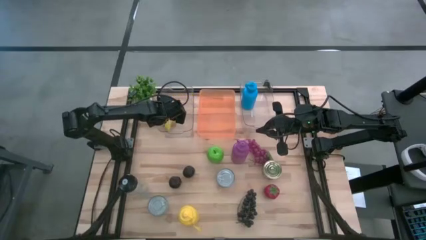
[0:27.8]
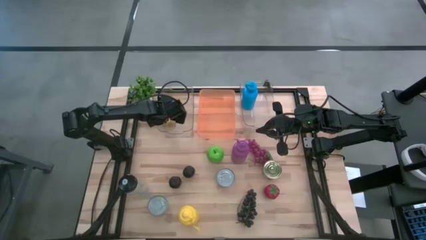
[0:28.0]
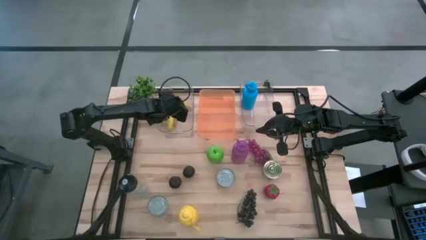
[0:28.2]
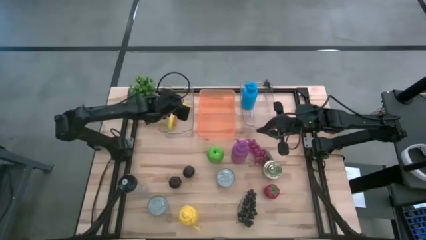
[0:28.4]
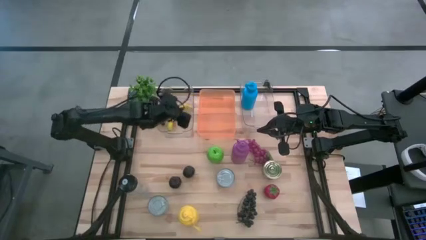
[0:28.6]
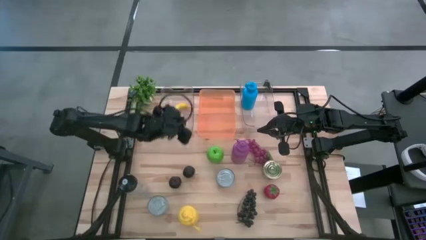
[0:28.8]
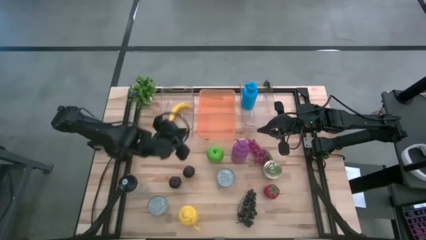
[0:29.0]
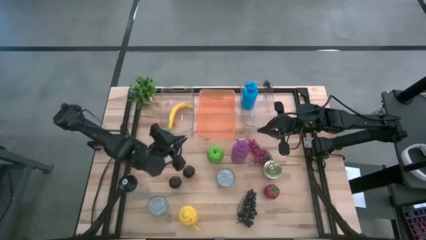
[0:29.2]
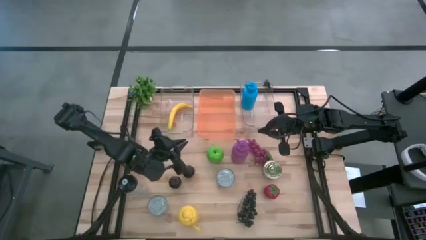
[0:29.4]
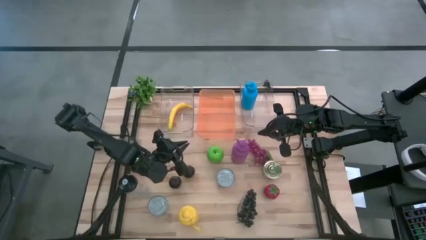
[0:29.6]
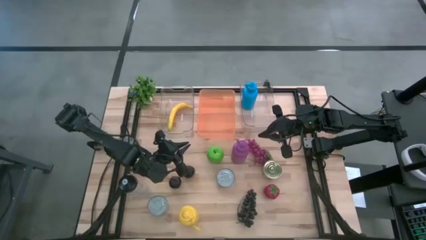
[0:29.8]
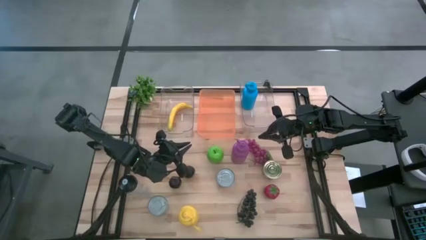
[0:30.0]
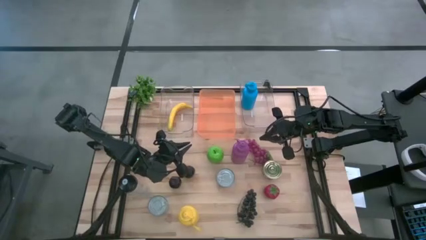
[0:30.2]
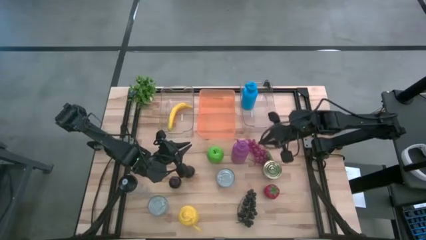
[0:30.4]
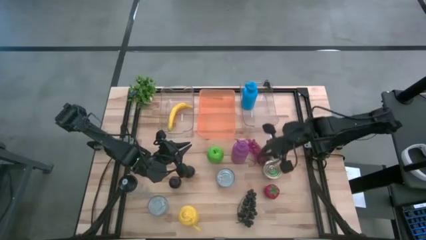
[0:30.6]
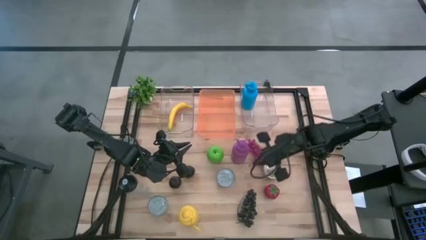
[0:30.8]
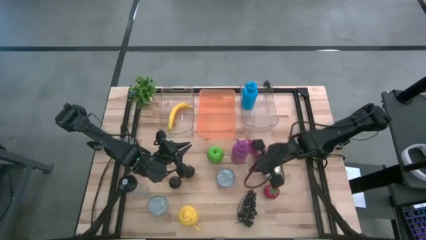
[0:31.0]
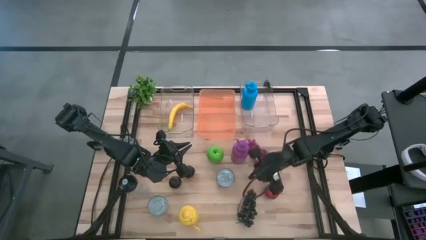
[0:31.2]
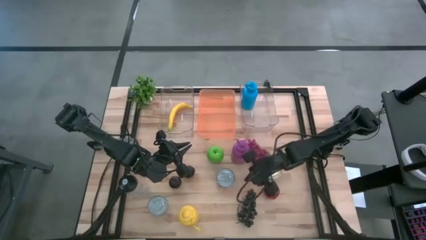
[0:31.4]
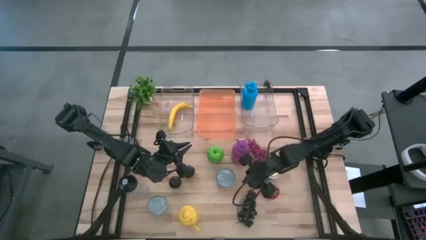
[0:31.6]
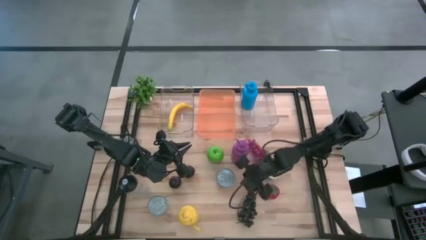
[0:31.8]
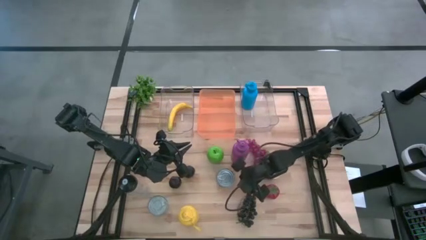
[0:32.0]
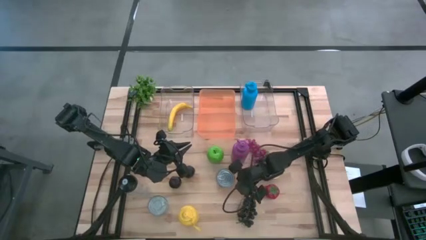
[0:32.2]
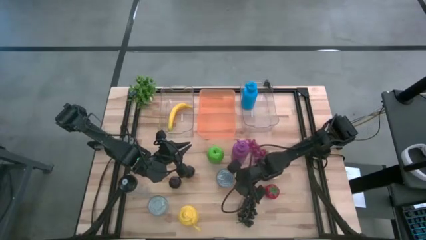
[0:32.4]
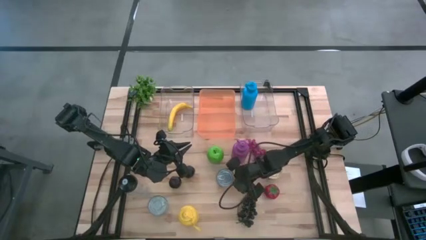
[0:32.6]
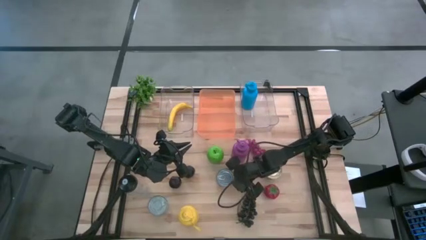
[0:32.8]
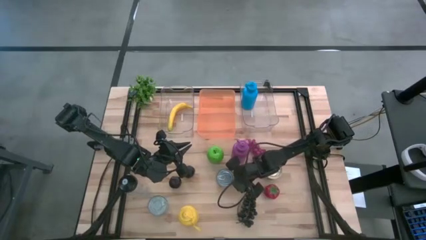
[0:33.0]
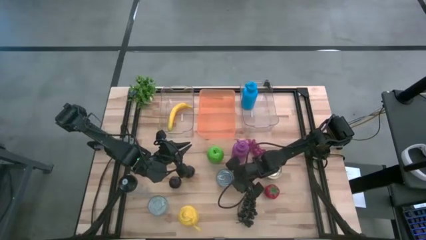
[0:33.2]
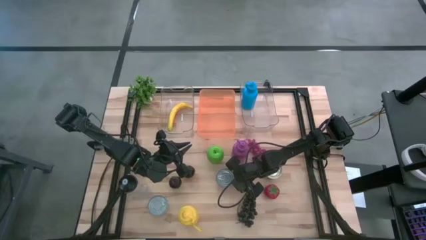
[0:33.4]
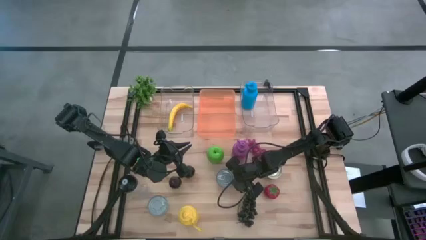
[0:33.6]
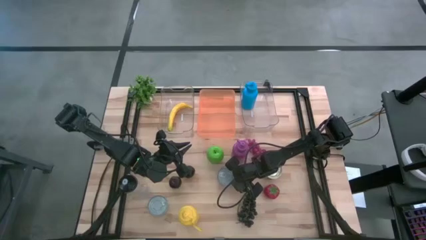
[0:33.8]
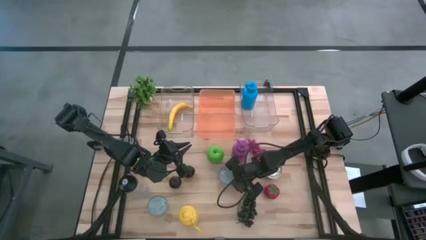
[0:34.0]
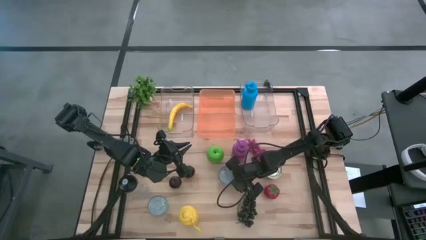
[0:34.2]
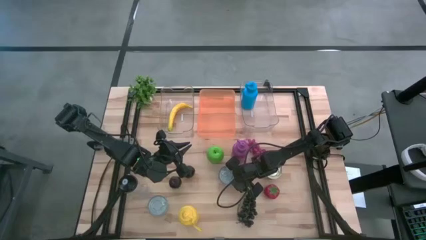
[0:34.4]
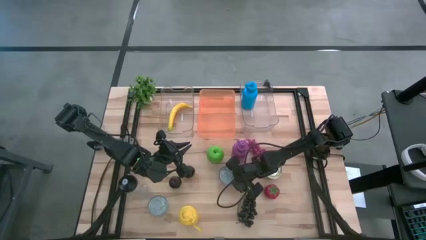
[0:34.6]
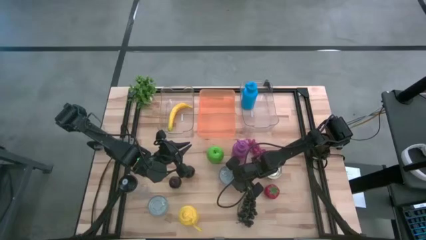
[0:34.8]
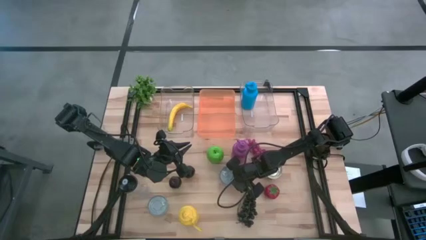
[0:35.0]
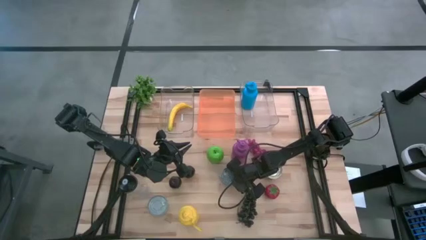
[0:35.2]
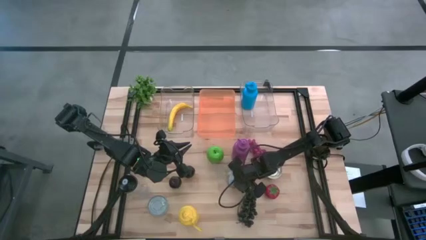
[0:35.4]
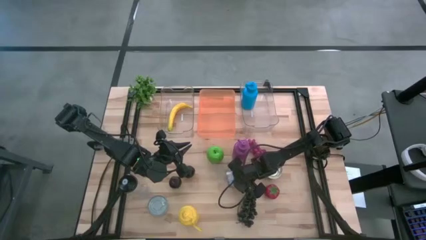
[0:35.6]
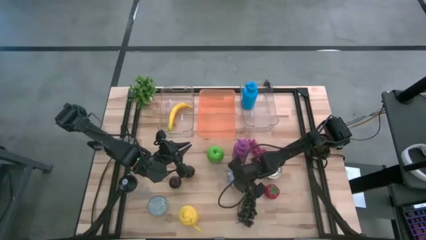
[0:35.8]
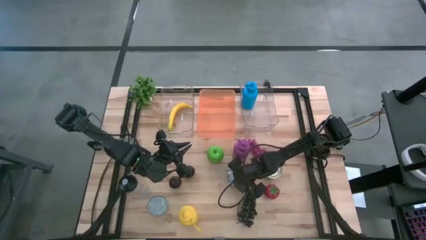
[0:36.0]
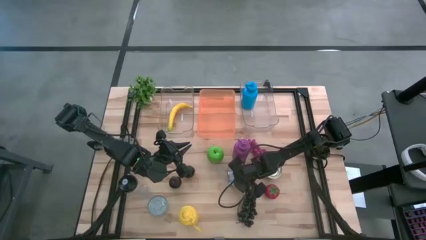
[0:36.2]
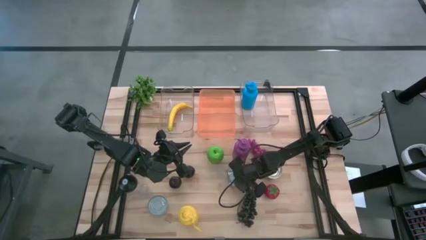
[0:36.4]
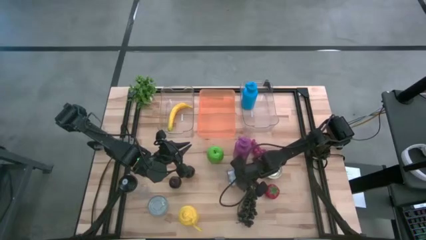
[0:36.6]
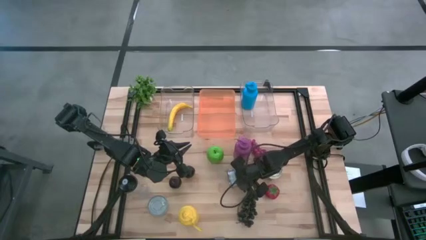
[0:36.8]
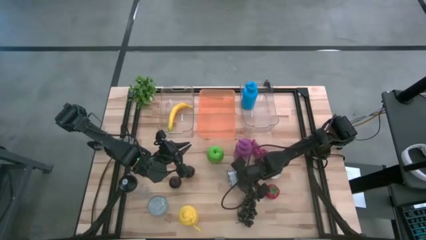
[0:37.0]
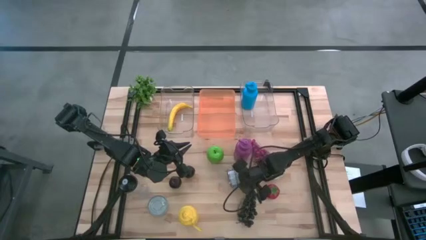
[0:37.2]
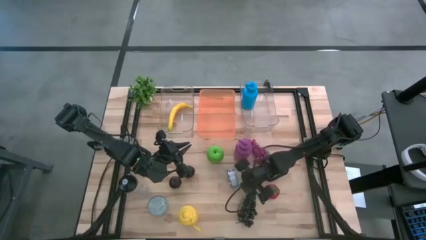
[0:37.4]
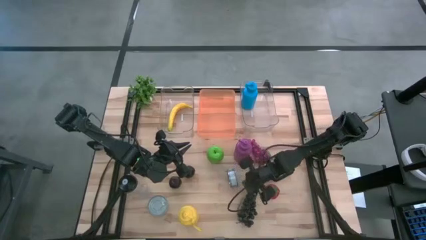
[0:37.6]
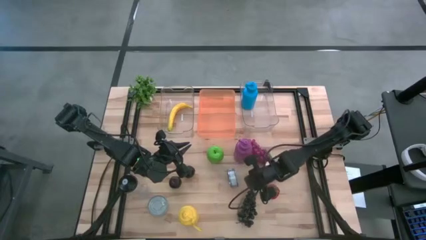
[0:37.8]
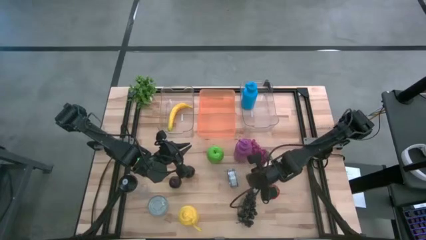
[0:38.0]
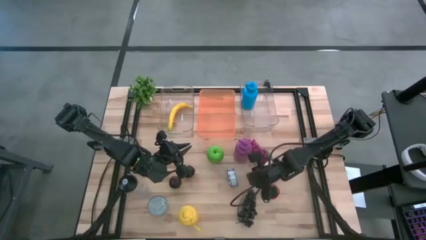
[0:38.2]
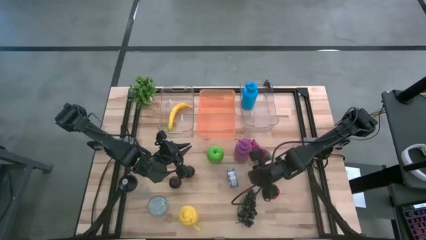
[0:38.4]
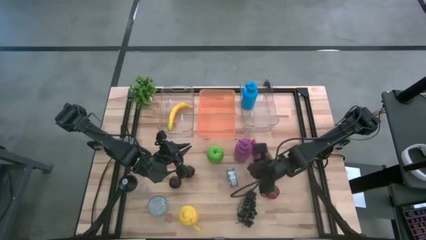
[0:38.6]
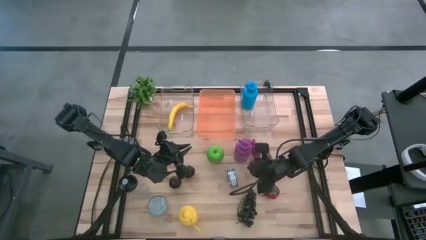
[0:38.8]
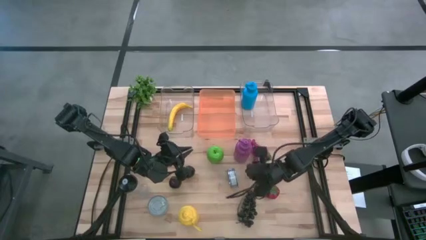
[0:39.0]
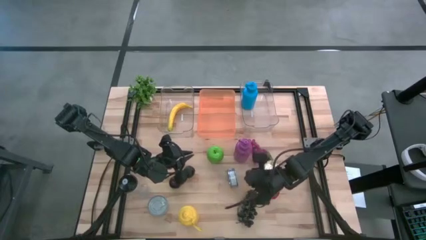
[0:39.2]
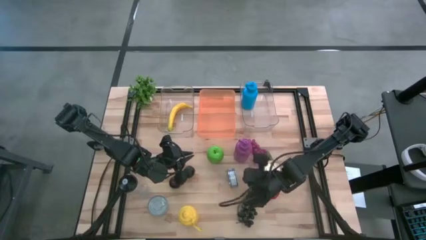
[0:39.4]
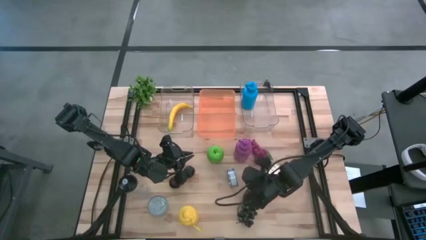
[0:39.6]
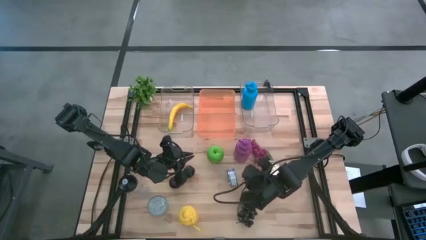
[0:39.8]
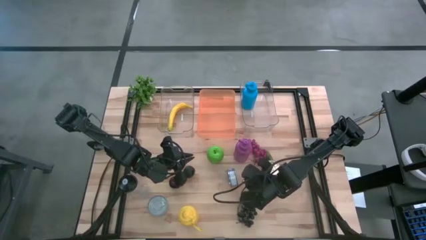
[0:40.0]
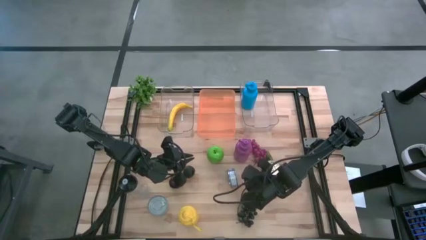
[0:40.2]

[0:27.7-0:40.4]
Task: Pick & Place Food Item
Put the blue tuna can into the orange bin

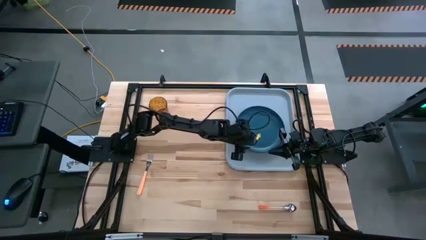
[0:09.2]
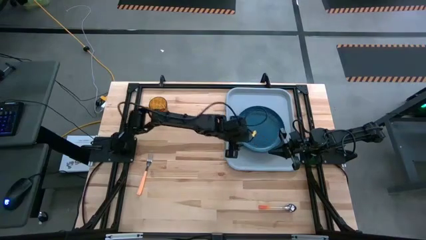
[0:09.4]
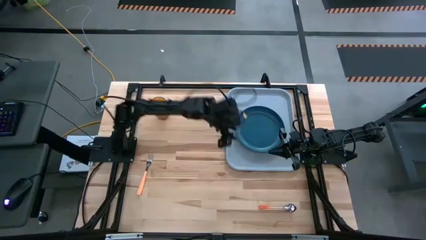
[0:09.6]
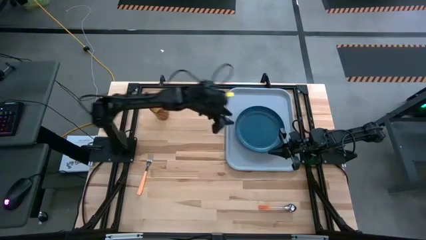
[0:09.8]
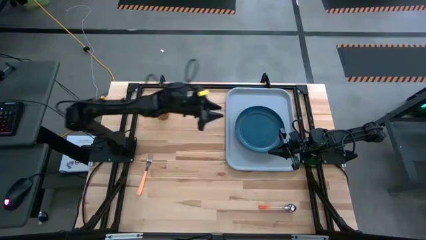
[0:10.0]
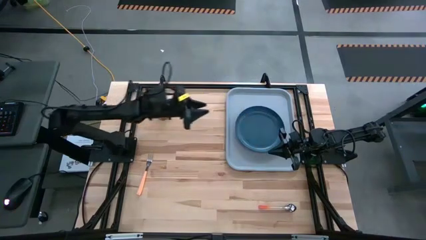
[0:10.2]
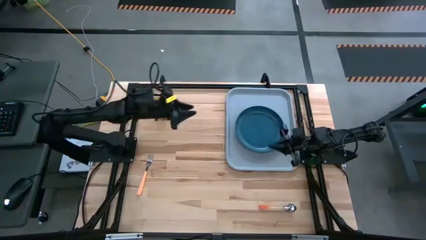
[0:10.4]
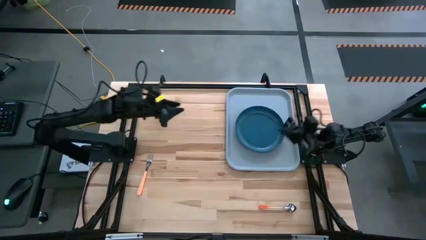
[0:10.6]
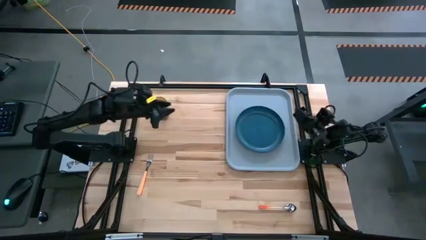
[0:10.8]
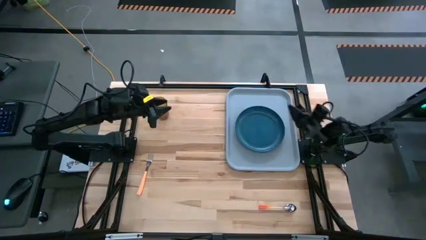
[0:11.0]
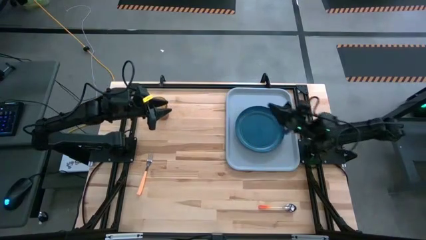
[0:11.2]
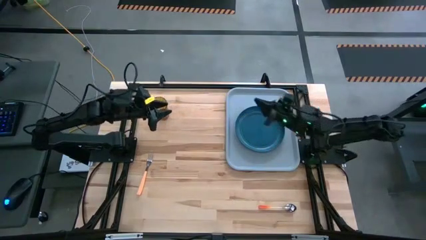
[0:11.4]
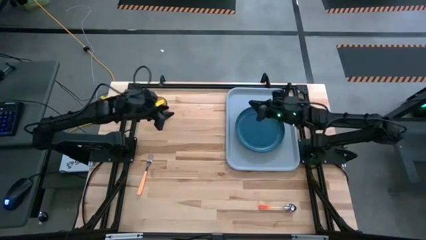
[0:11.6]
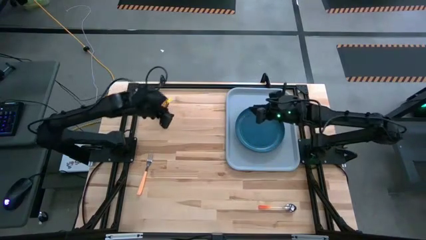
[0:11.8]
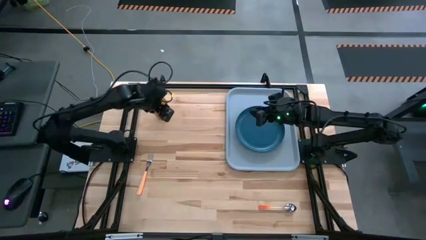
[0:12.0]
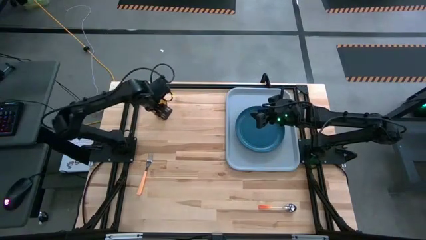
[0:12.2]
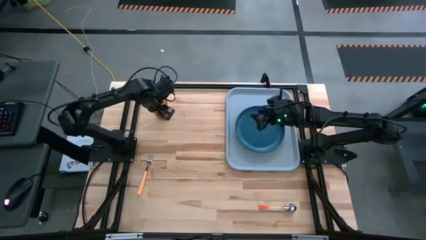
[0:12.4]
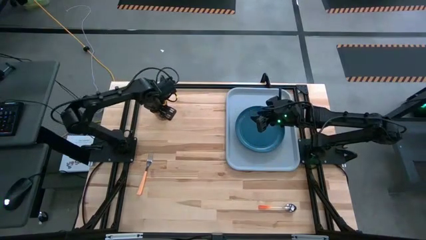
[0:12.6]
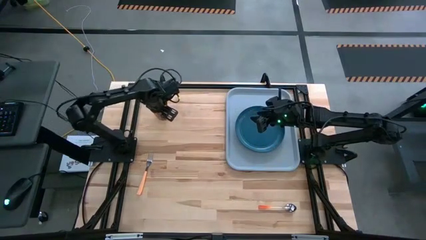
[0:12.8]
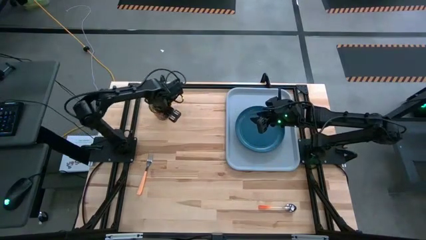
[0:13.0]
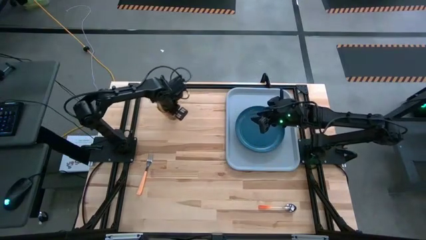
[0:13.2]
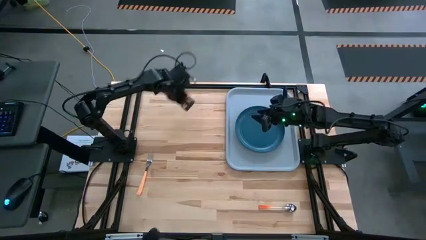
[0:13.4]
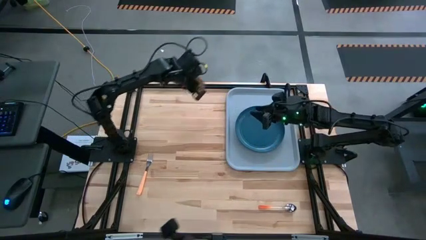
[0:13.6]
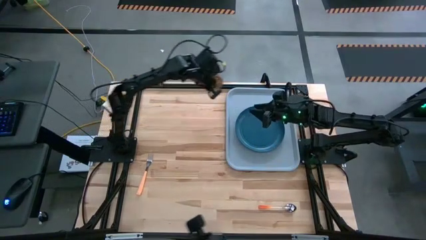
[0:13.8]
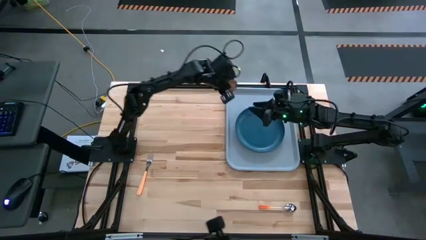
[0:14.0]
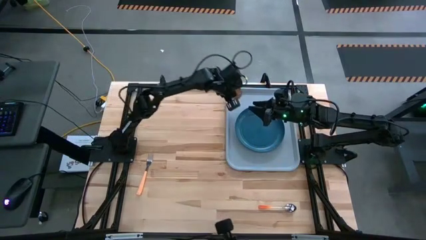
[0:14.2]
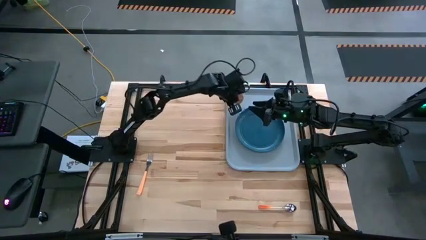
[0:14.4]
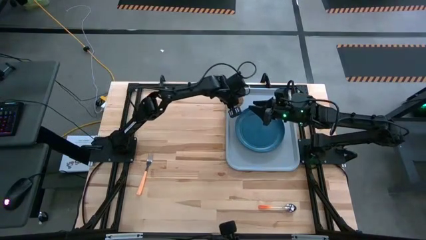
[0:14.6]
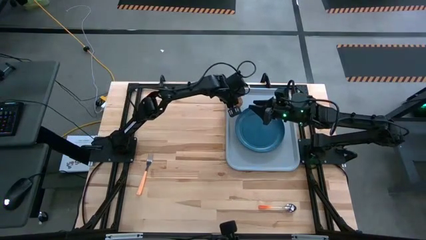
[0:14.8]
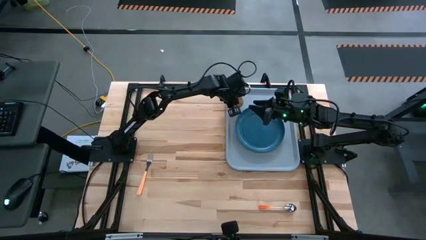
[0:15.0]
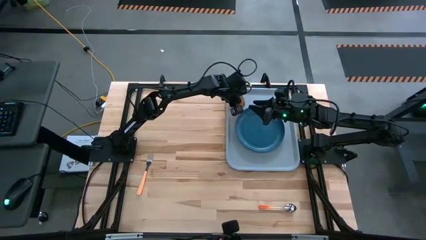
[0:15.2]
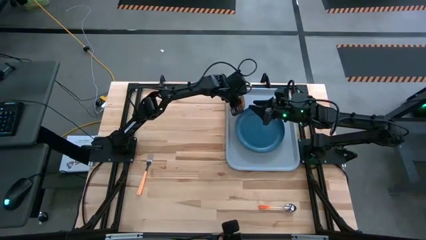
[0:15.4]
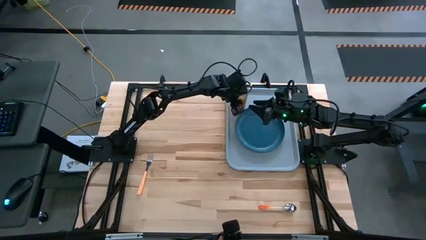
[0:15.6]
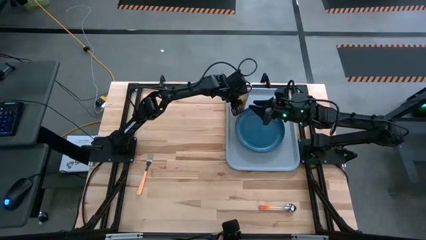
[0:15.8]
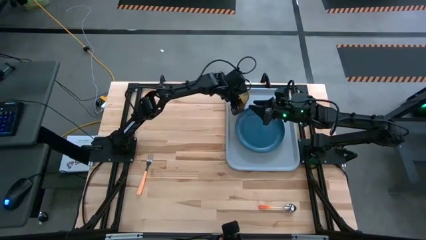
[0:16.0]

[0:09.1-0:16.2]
Task: Pick and place plate/cup/fork/spoon on tray
Put the orange cup on the gray tray to the top left of the blue plate
